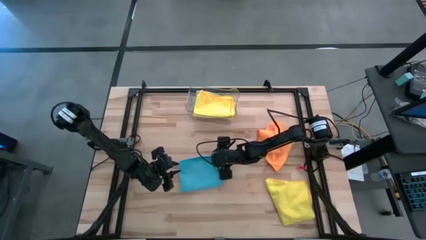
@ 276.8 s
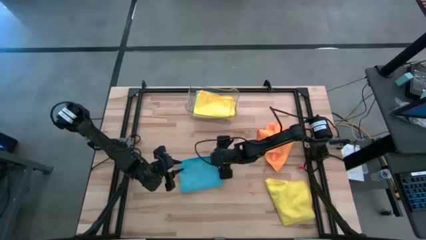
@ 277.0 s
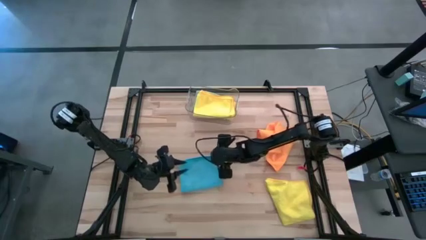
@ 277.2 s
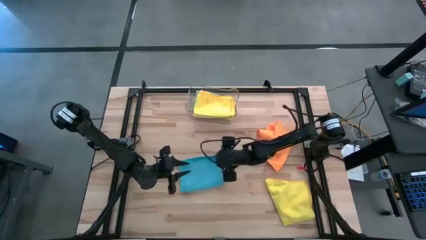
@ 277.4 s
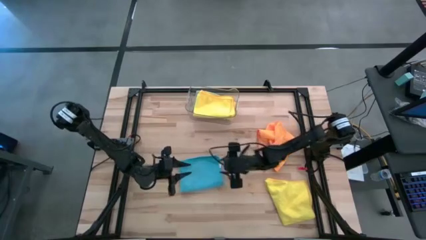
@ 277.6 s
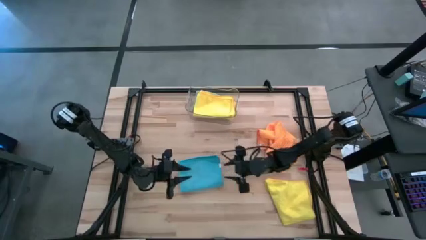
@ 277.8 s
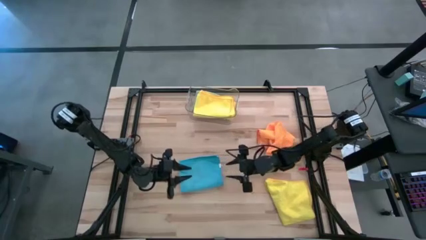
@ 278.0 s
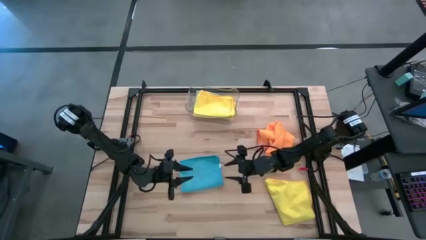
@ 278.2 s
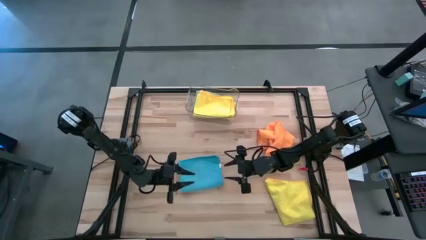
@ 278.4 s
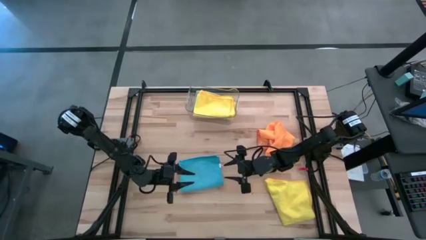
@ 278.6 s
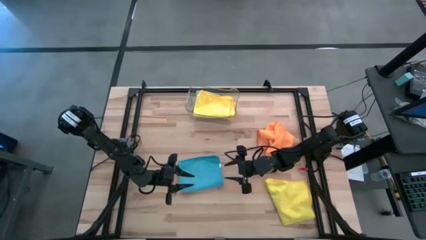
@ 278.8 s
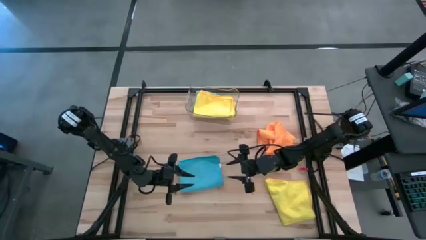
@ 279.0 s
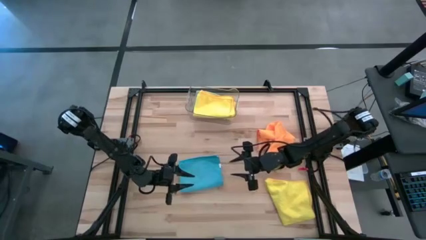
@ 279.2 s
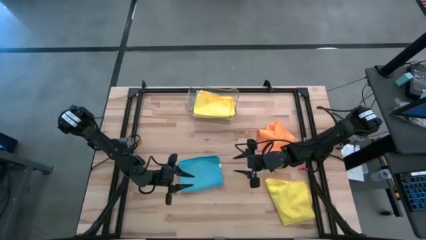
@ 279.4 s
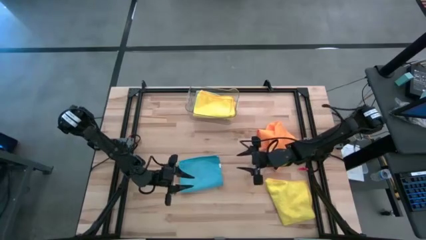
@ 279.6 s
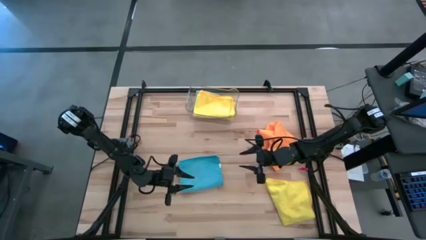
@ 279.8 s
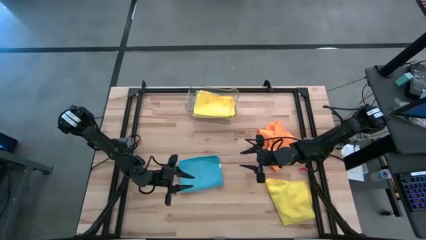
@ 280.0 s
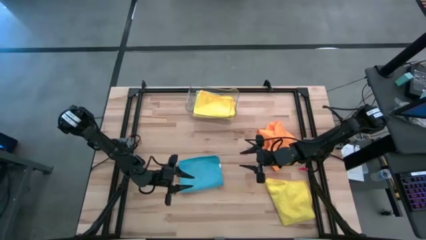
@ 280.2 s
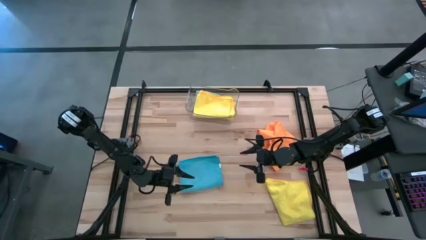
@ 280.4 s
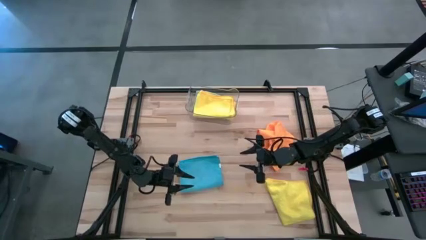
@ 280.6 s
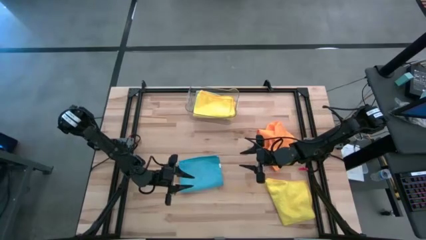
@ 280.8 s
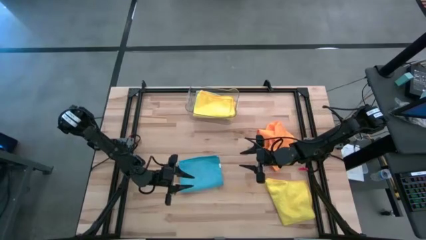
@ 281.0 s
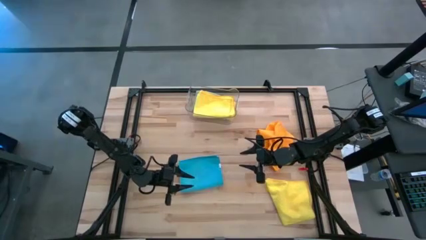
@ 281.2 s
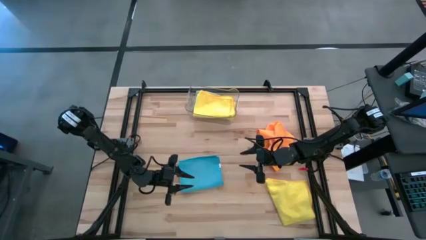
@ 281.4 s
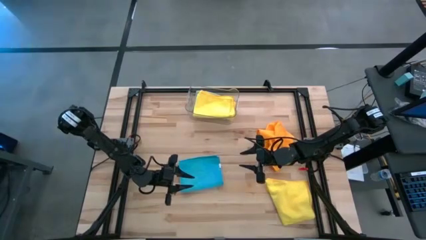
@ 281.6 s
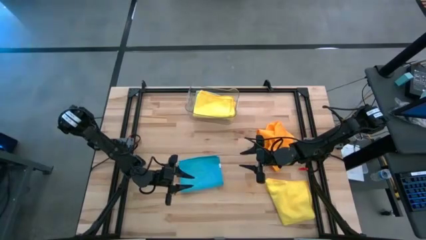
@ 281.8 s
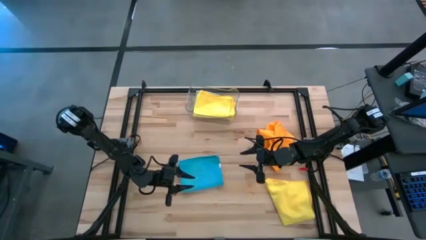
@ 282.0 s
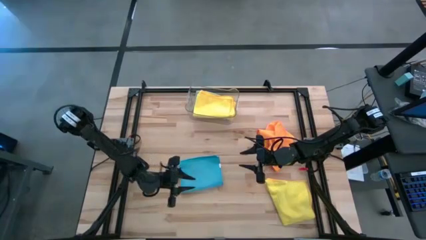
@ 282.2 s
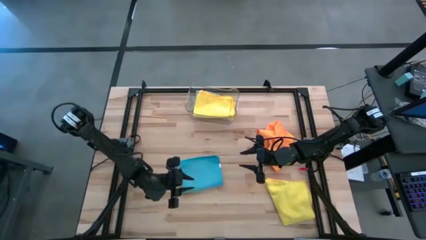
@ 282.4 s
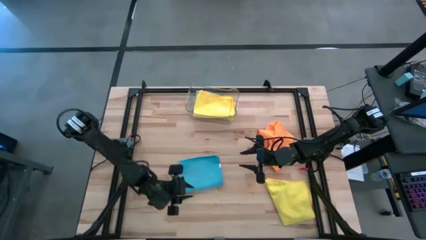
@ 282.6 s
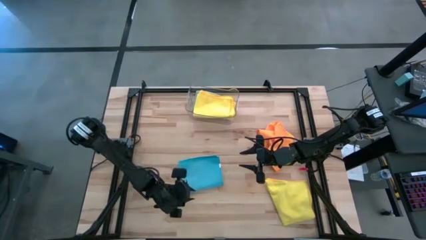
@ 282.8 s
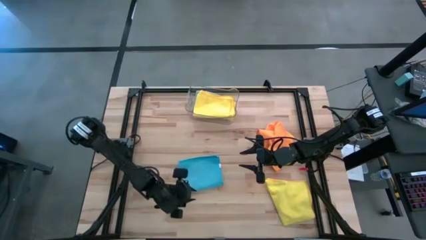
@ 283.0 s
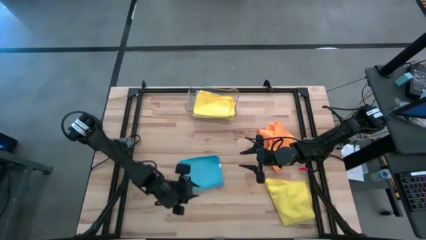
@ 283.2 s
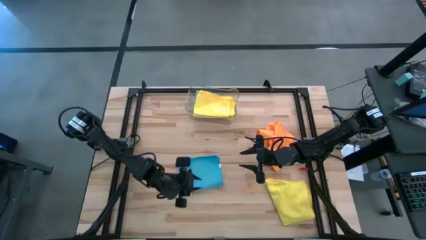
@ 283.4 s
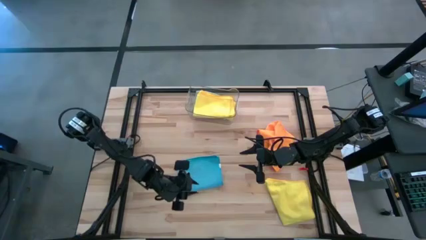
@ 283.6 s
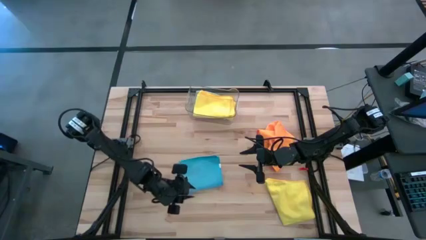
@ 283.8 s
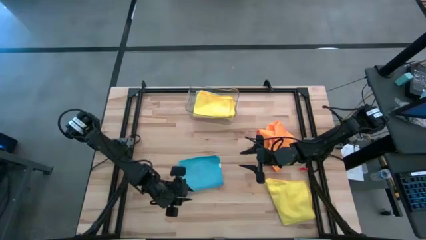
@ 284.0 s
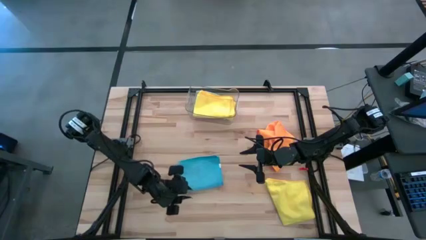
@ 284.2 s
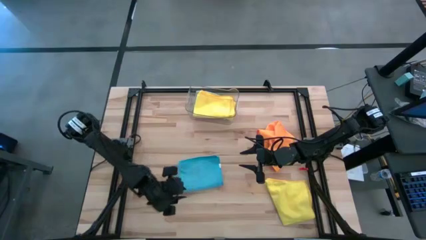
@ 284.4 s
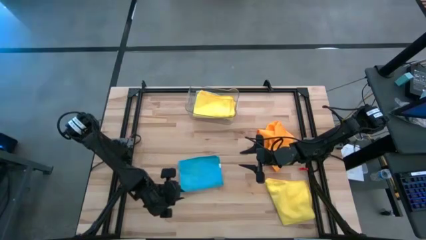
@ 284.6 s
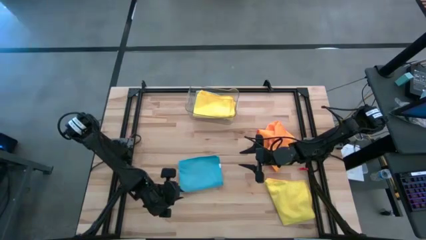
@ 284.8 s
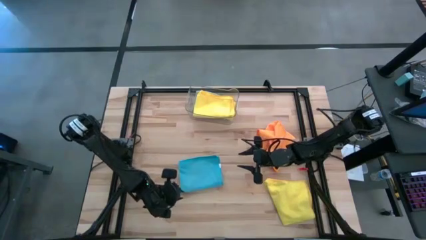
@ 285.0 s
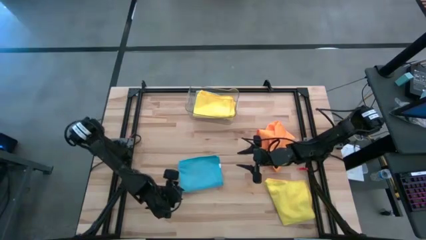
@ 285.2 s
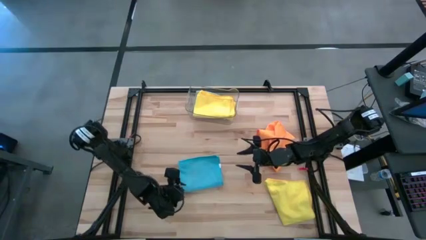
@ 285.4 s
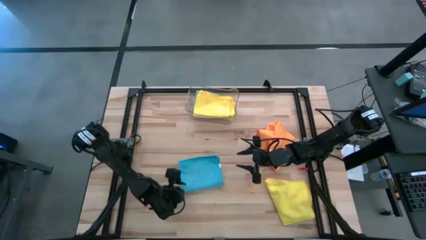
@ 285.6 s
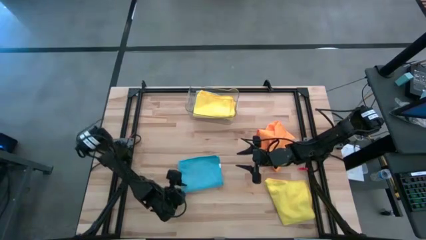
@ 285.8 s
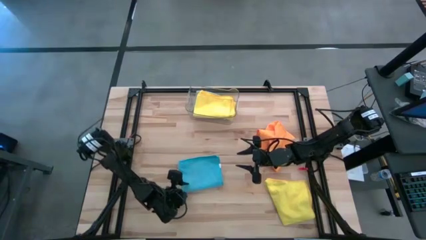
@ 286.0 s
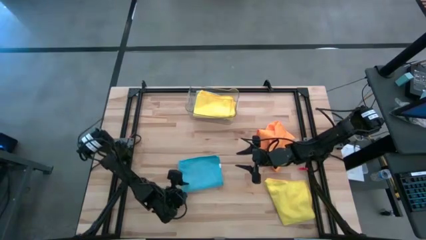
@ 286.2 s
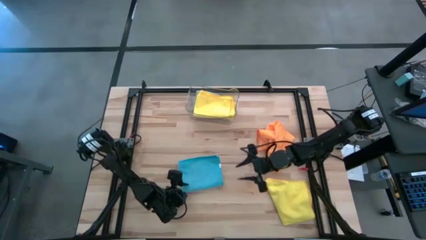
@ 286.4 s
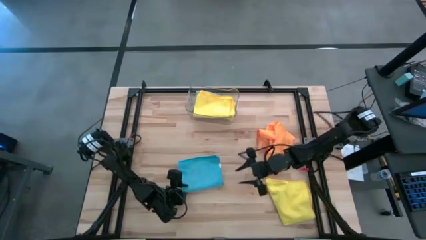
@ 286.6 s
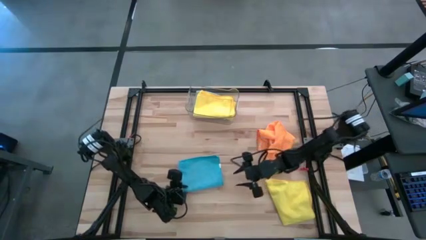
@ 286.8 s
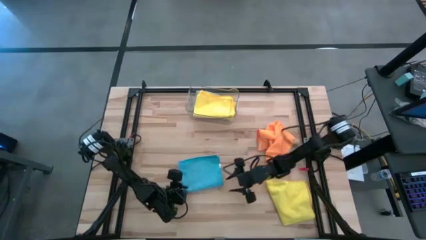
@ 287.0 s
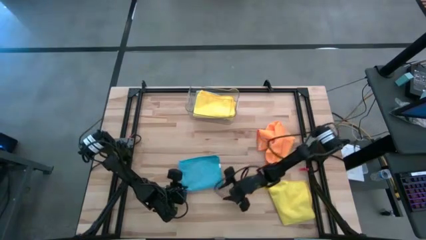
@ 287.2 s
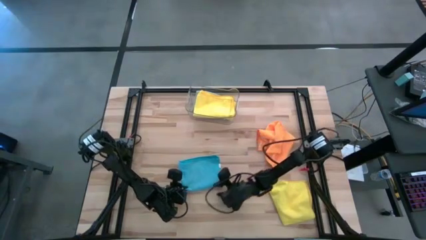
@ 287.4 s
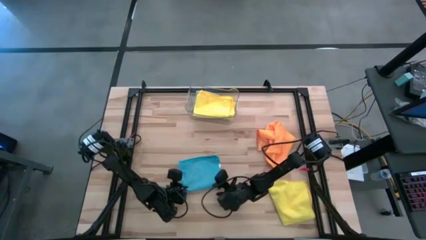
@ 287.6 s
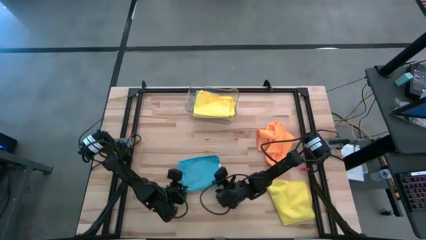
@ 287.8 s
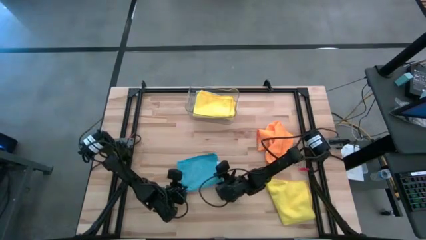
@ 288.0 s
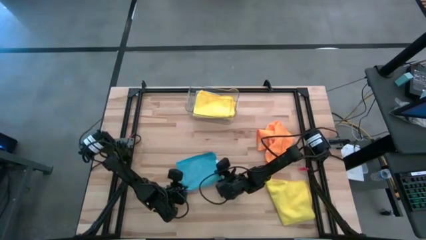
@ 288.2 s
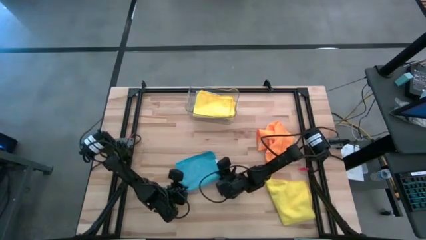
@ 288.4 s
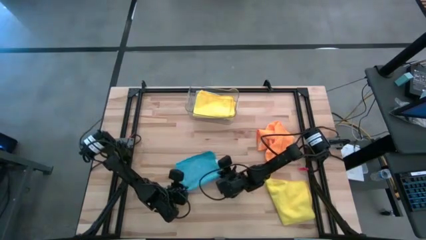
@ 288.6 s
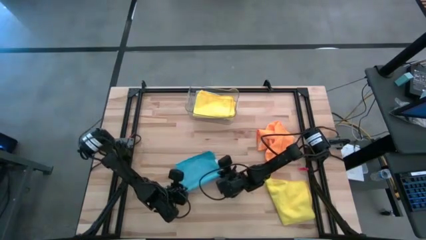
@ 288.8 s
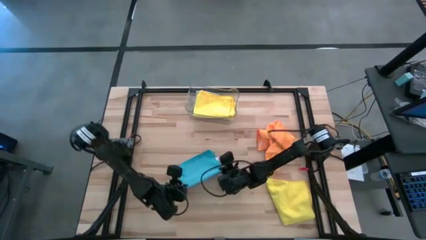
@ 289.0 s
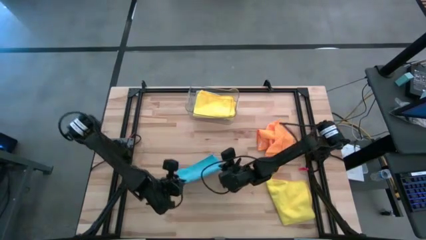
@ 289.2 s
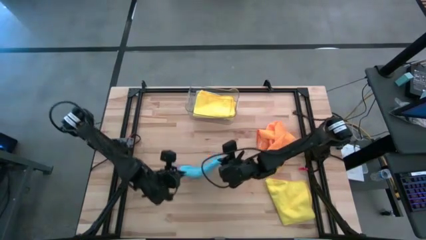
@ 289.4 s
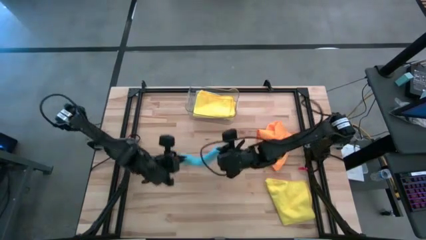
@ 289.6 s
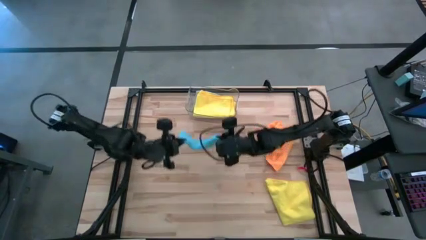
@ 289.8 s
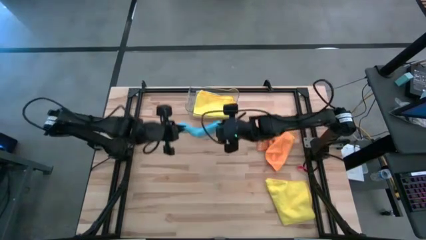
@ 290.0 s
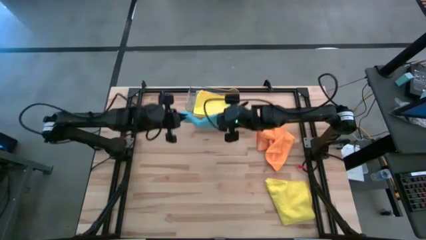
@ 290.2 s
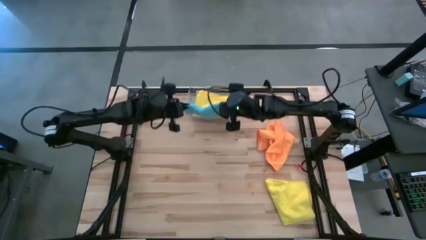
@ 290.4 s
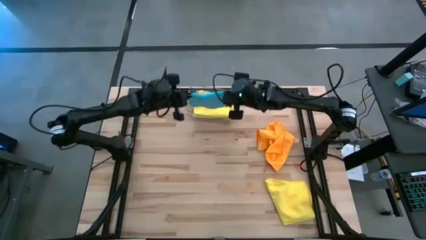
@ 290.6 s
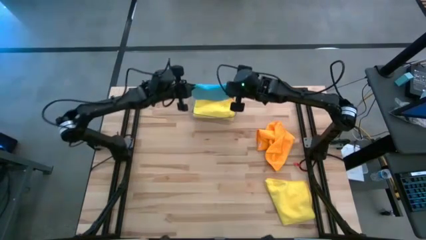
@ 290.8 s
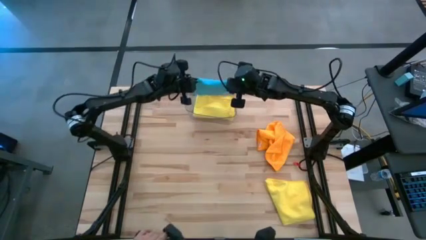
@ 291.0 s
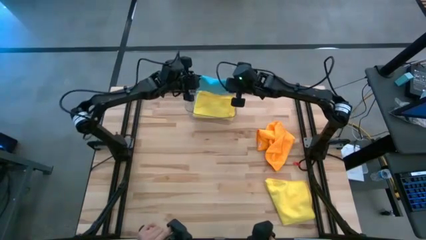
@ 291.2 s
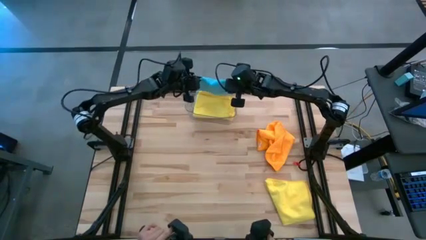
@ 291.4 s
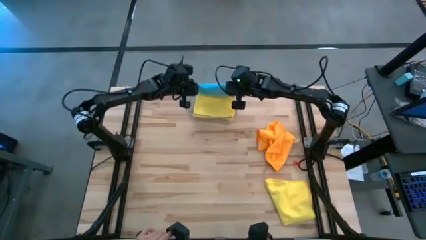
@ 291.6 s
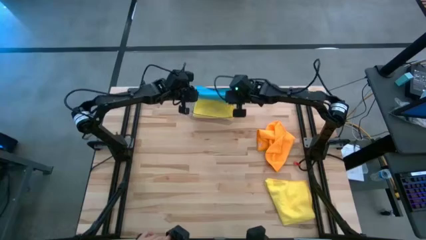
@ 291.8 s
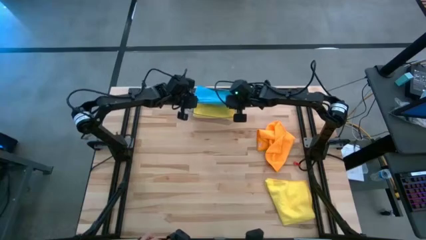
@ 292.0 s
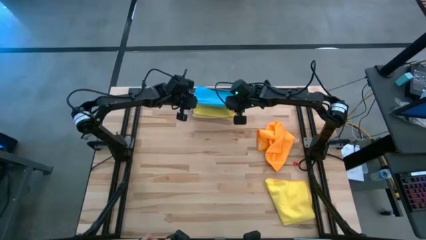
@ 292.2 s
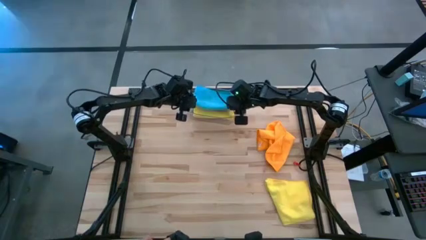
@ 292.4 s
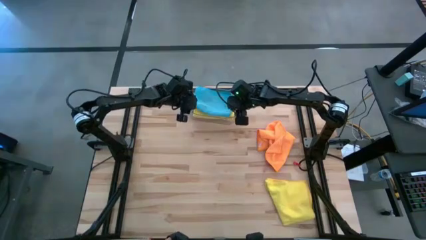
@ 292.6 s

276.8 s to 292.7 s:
Task: Fold microfiber towels
Put the blue microfiber cloth into the transparent bin
